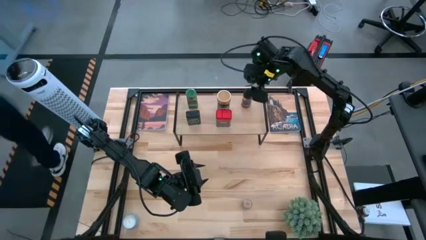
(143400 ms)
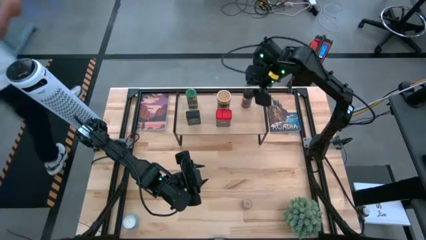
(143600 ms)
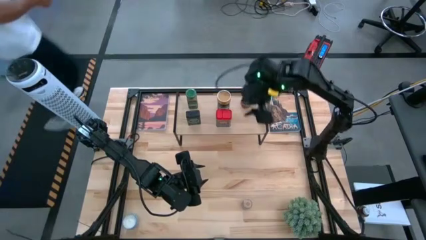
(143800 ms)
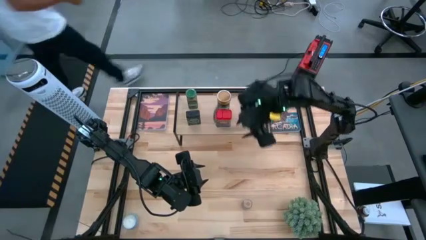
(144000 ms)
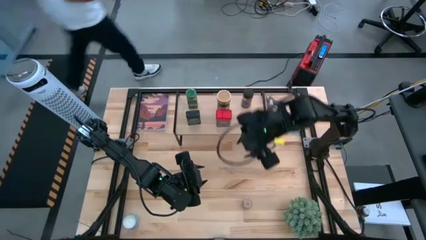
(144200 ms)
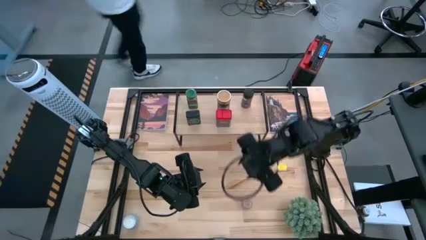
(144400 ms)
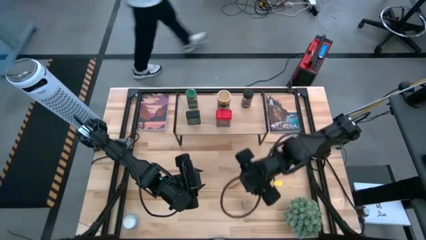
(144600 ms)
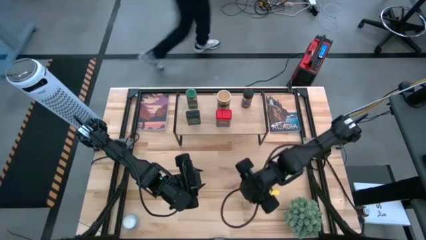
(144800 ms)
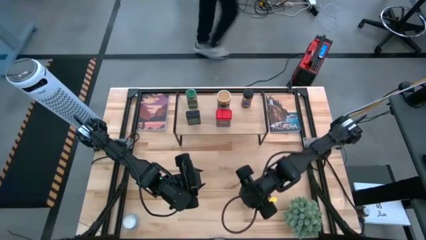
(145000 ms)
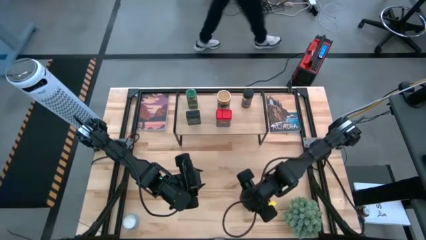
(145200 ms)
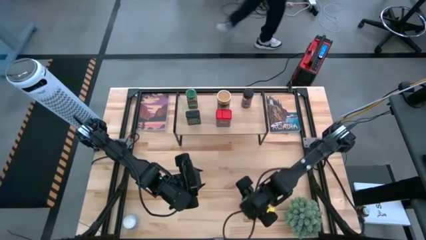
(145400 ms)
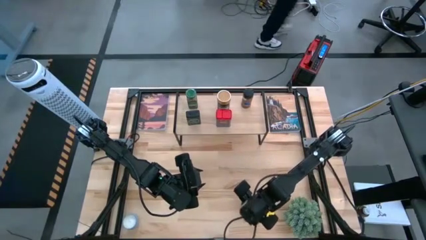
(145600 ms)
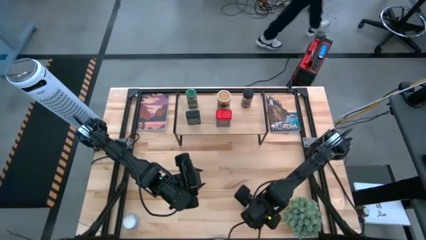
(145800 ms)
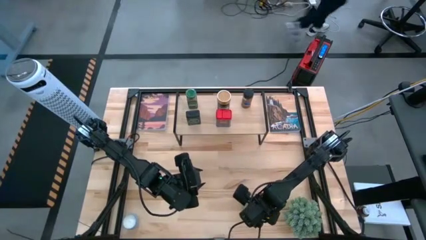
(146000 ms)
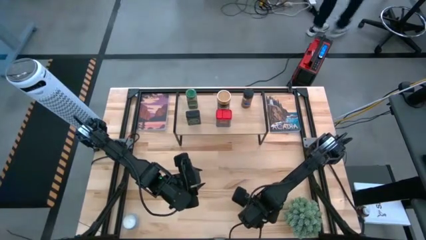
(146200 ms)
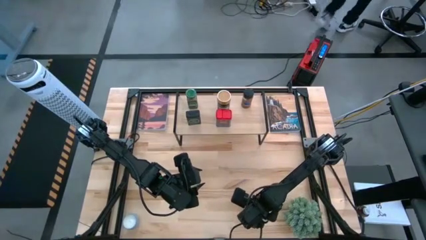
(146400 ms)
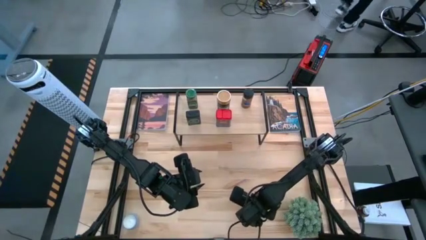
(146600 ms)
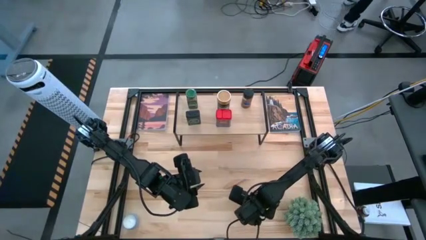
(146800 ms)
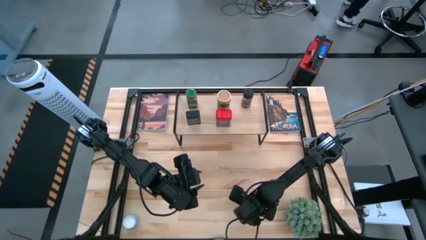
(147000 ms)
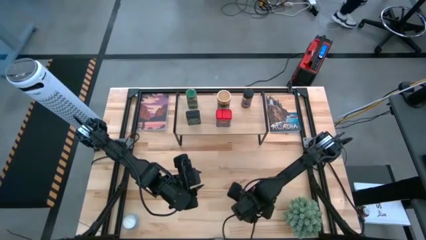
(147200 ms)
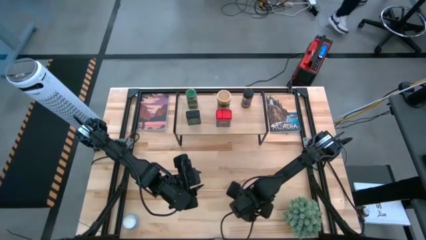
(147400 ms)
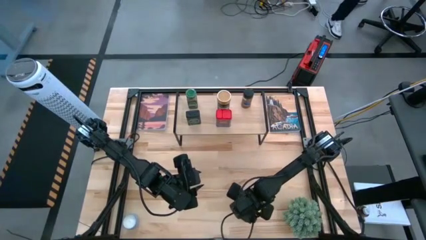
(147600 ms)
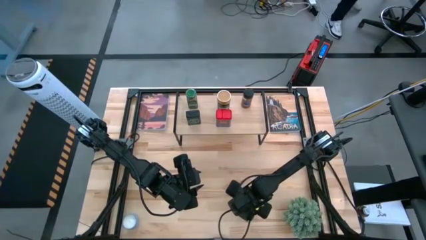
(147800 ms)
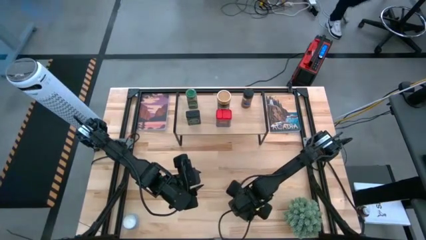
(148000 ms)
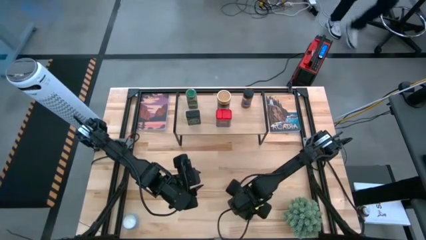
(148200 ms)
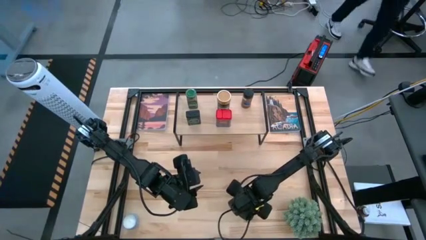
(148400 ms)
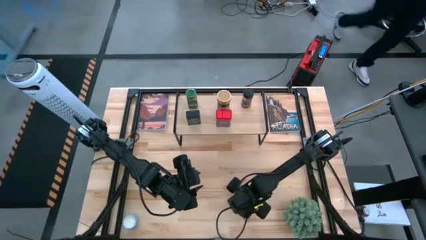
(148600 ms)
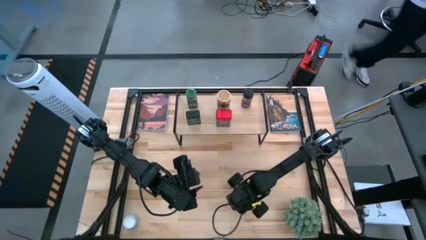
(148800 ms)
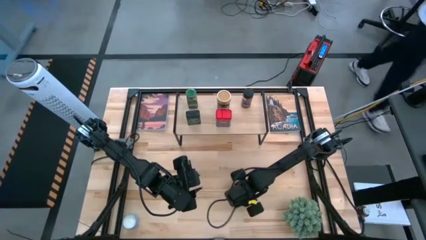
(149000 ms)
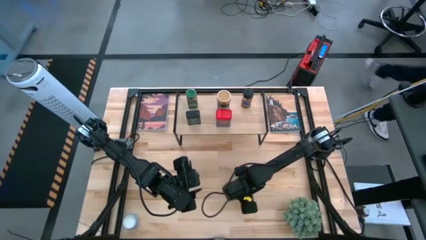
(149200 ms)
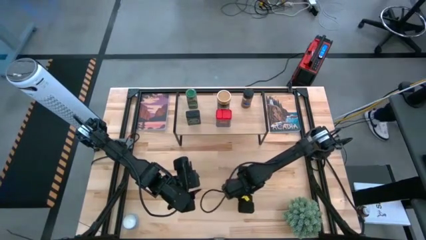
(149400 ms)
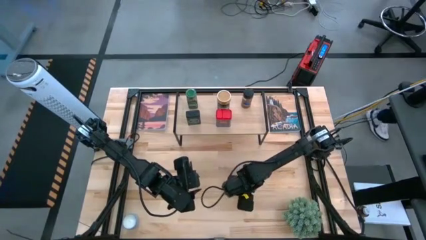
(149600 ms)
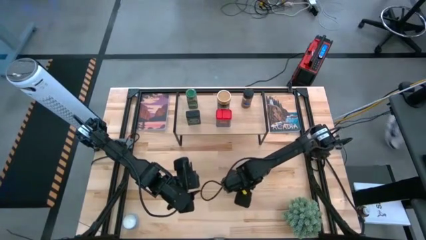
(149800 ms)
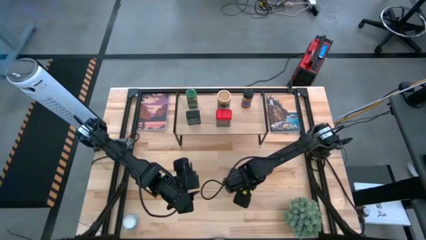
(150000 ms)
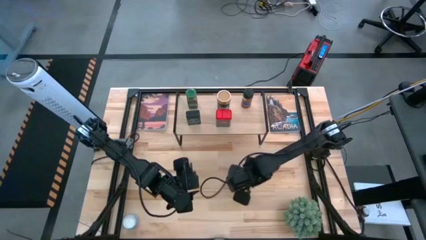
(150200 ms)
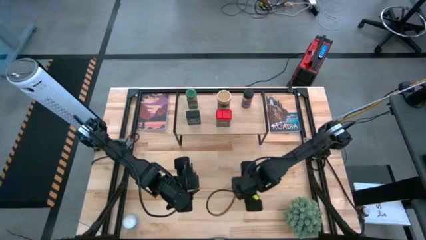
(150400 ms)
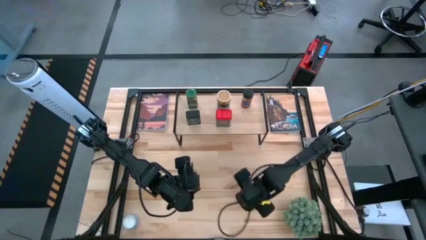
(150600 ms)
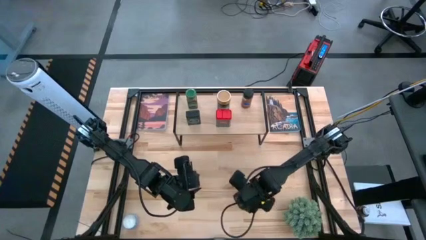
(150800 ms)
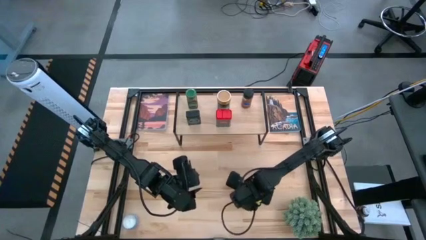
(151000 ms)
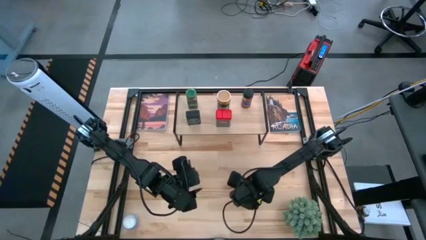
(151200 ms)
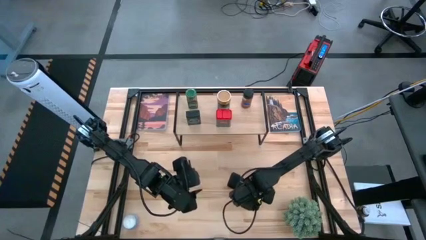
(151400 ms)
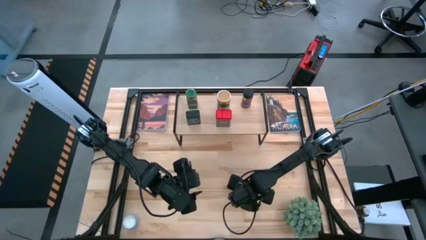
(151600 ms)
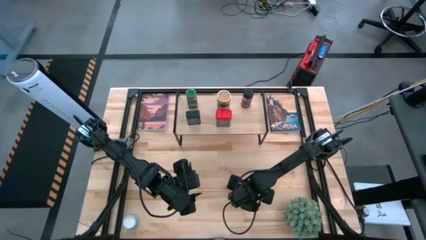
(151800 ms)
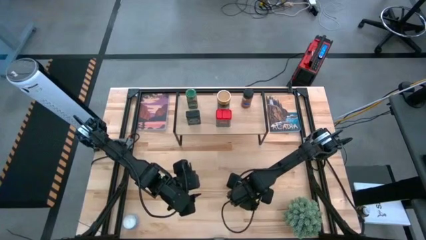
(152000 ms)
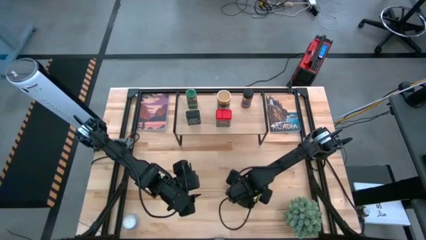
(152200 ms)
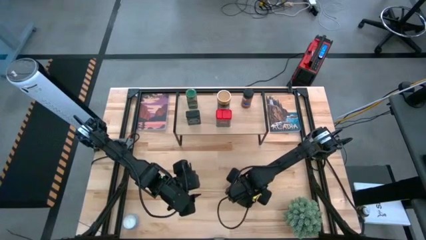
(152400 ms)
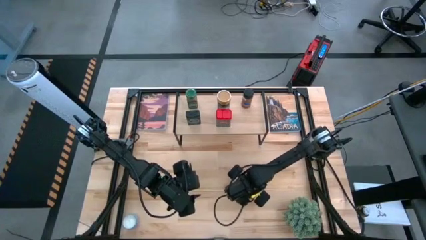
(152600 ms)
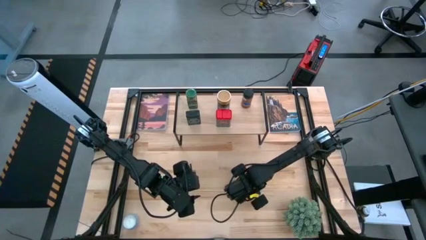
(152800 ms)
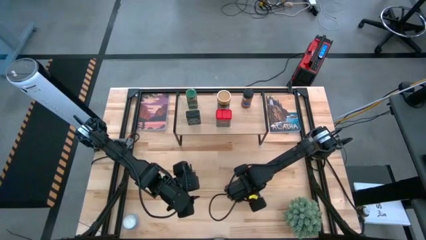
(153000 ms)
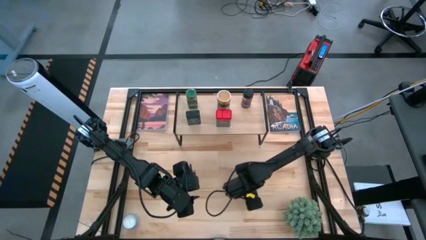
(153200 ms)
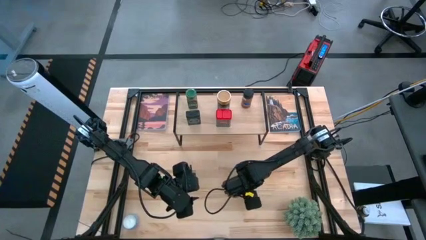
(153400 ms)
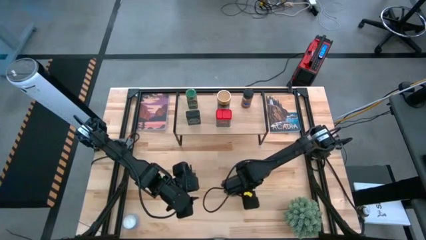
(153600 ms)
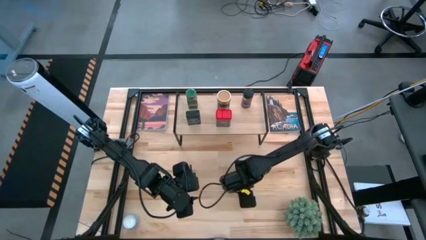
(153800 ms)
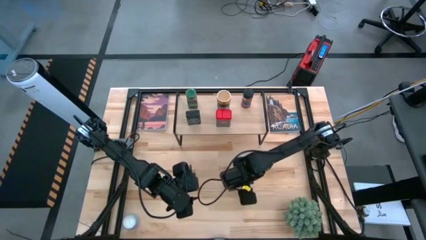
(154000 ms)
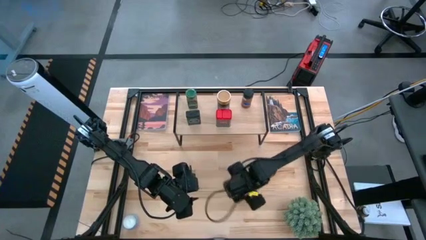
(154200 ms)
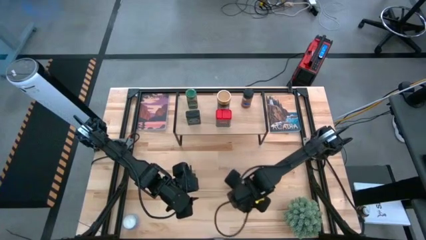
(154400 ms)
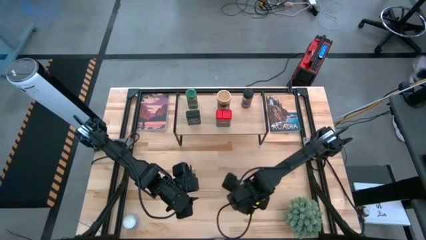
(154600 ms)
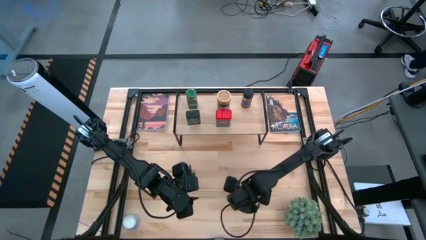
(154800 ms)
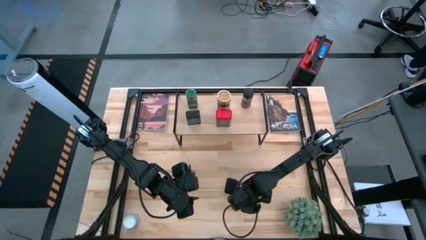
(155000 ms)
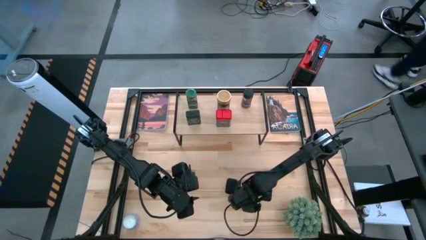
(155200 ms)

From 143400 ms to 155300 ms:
Task: Shelf spices
Put the brown seasoning bottle on the shelf

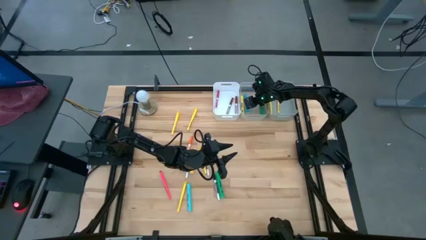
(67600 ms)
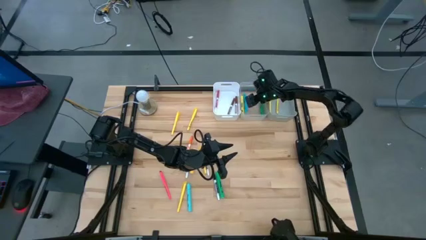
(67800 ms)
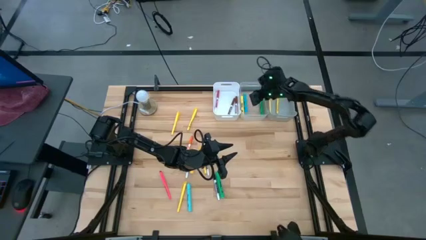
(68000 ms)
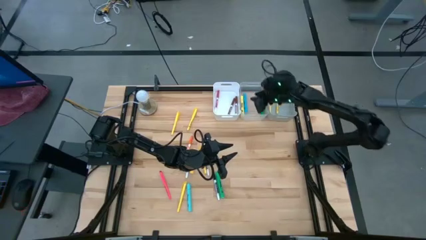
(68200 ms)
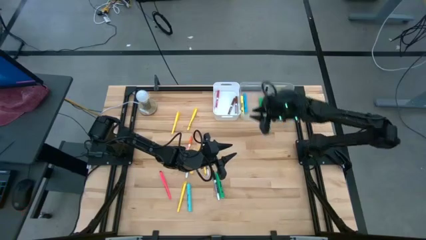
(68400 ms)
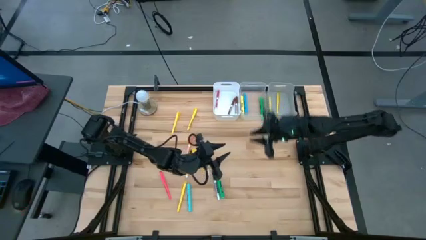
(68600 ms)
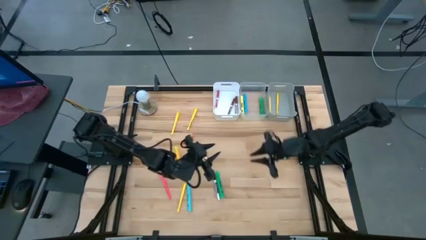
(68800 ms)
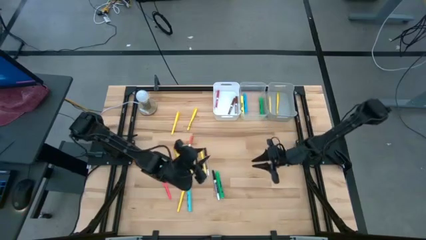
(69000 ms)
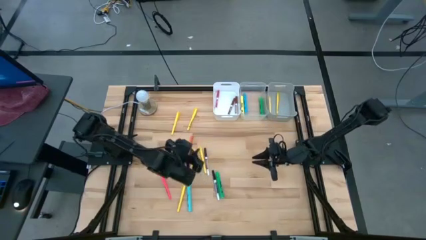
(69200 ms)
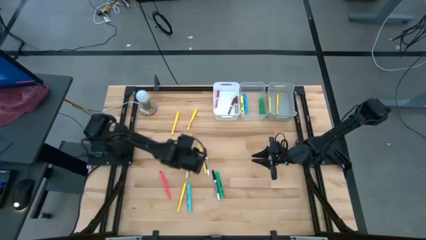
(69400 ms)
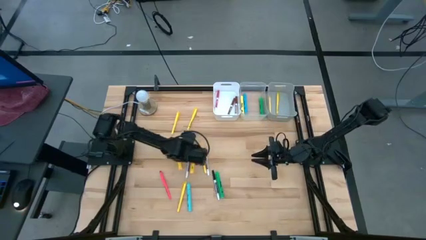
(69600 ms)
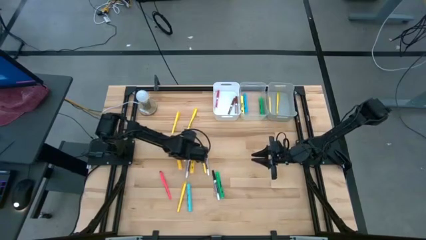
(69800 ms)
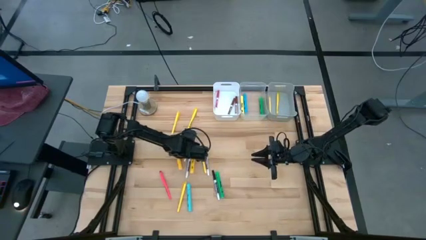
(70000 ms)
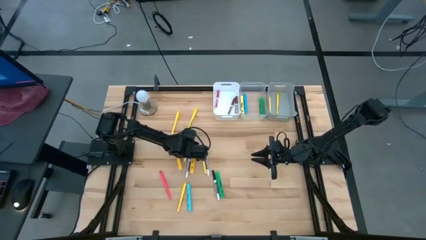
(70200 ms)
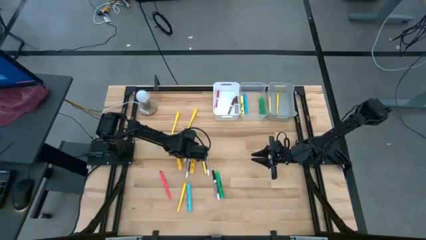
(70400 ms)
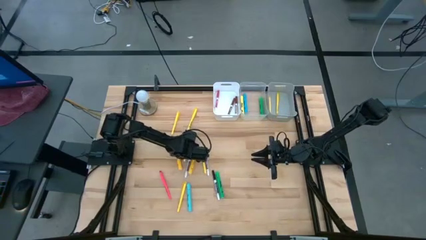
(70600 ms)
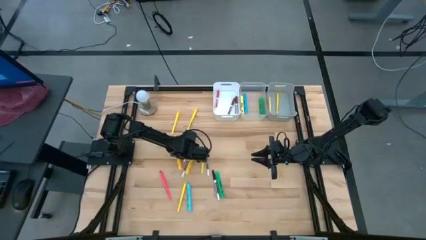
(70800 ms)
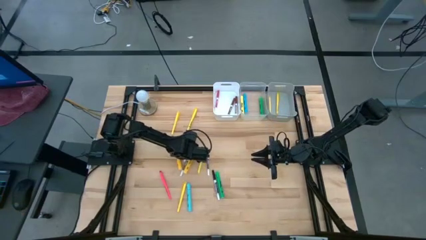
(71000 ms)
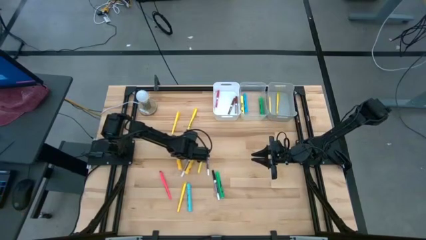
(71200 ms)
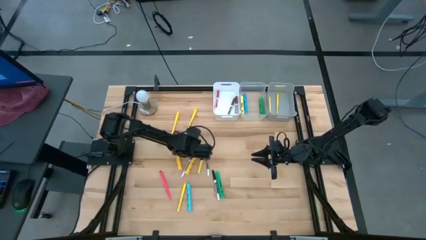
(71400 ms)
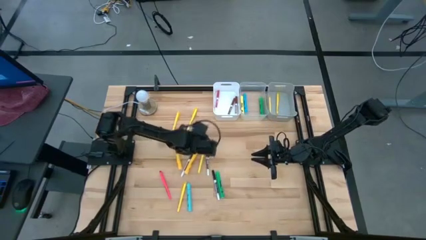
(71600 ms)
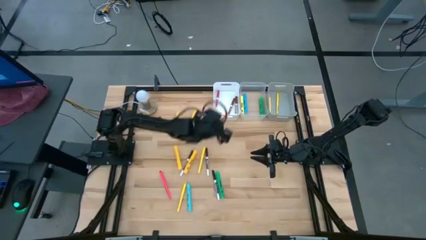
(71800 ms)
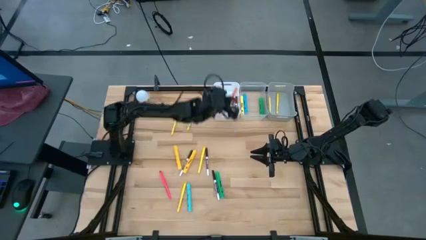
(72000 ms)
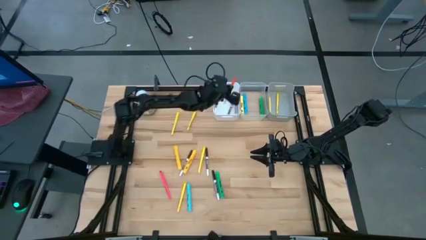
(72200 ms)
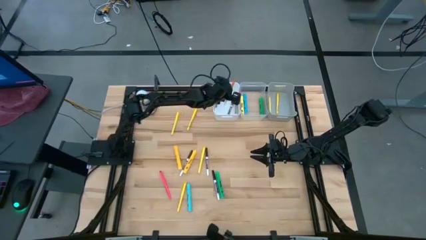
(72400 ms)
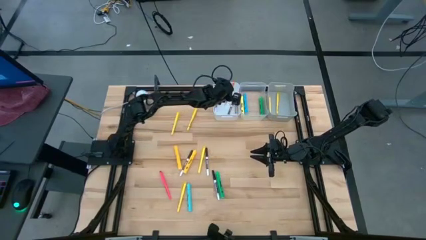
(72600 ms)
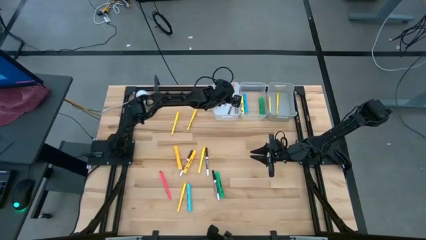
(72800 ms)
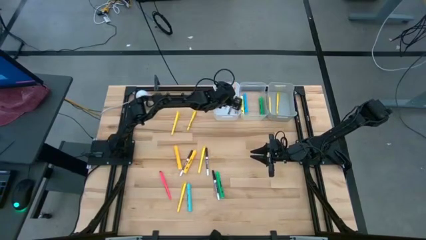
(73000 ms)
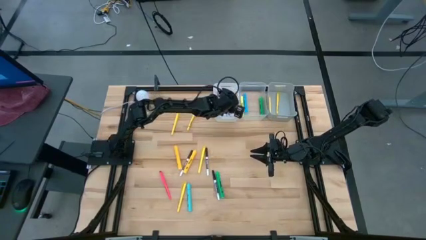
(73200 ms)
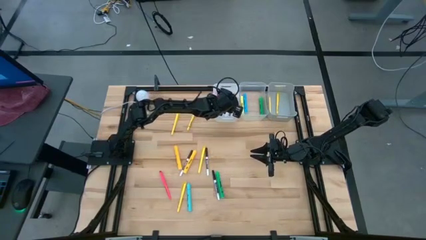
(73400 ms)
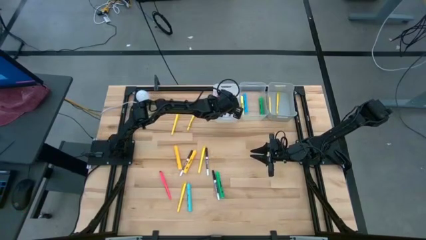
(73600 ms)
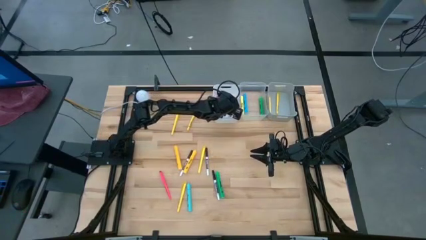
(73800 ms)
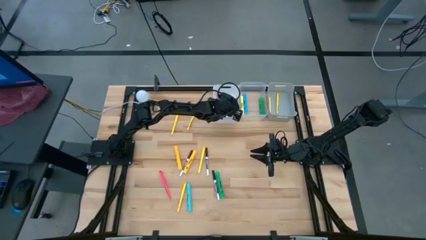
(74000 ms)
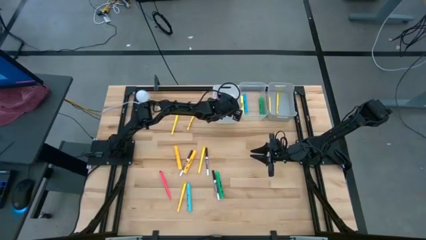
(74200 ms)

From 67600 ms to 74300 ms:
Task: Pick & Place Markers
Put the orange marker pen into the white bin
